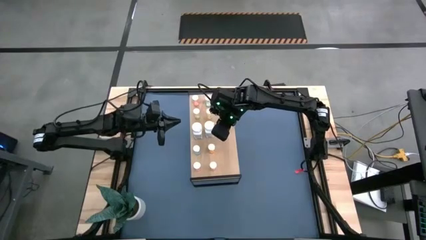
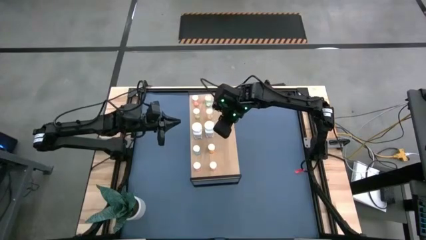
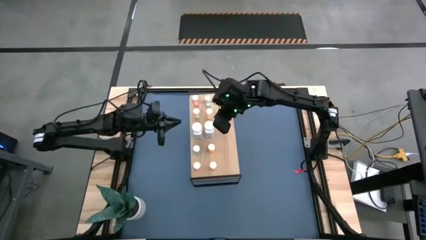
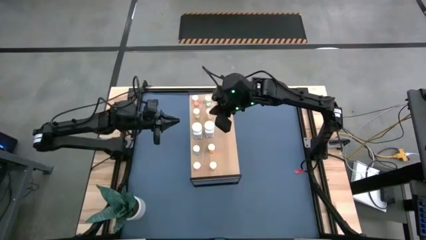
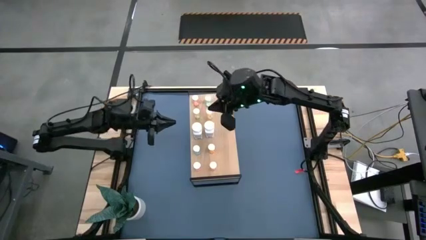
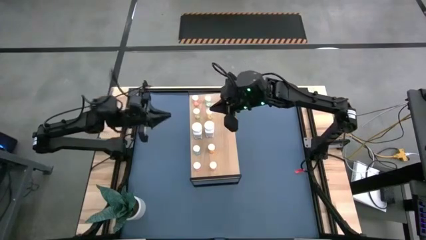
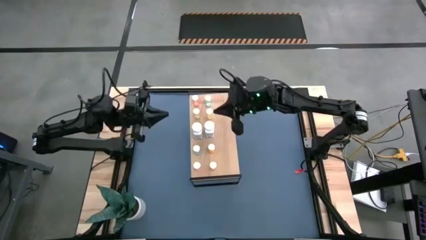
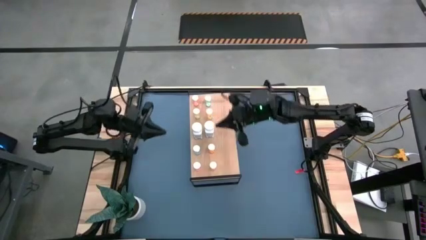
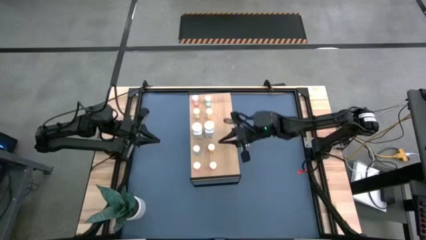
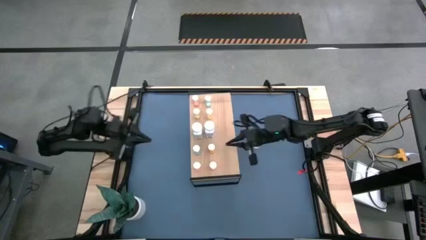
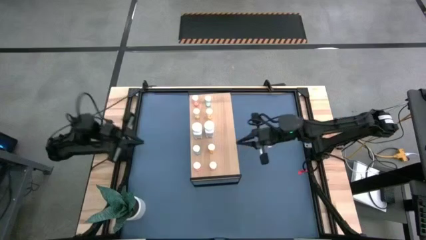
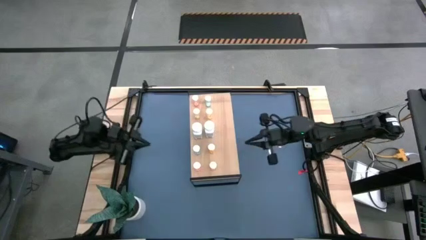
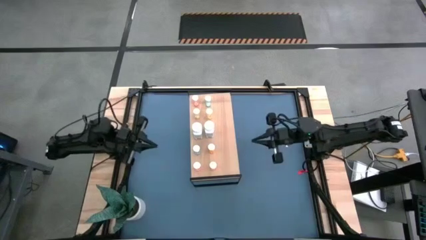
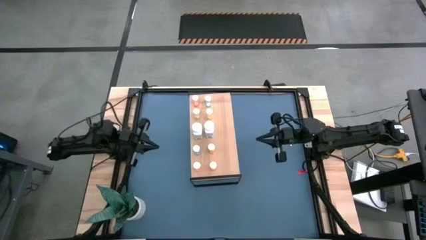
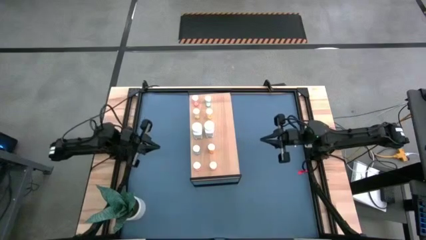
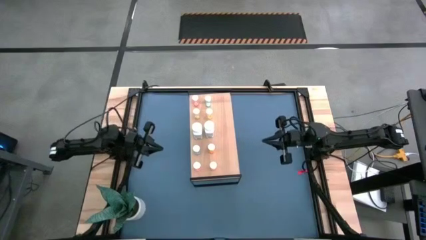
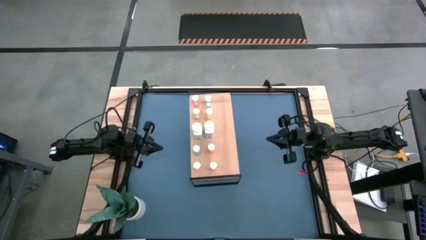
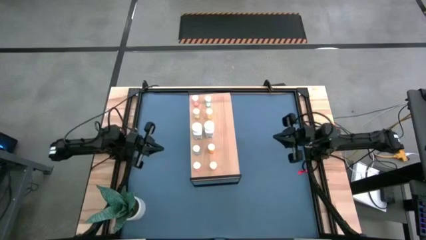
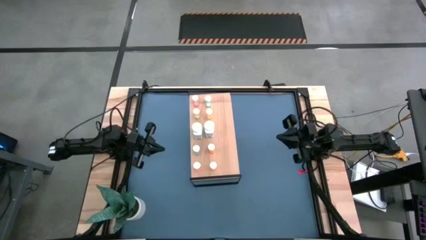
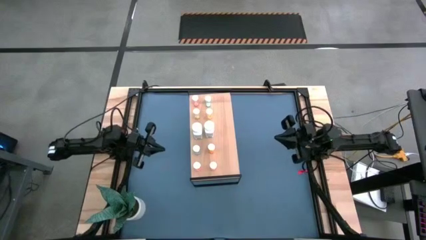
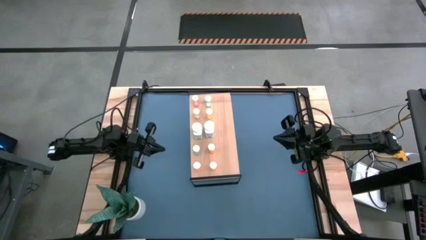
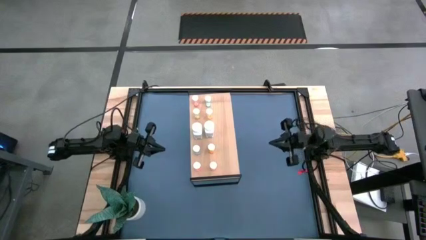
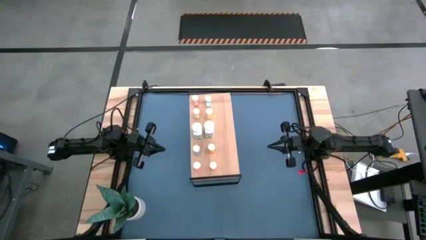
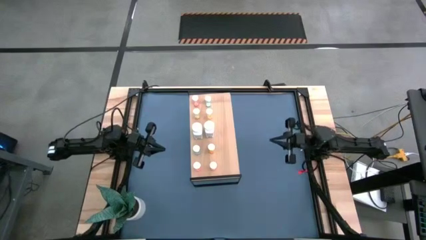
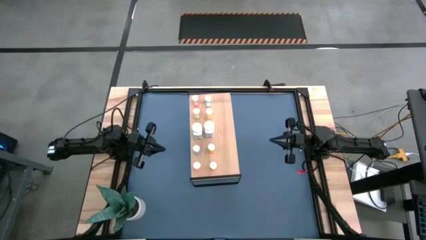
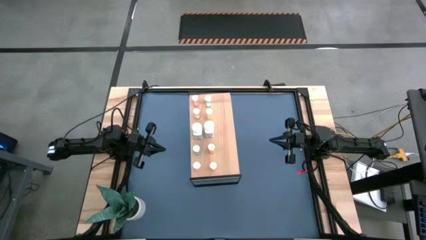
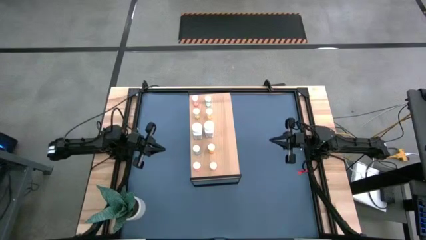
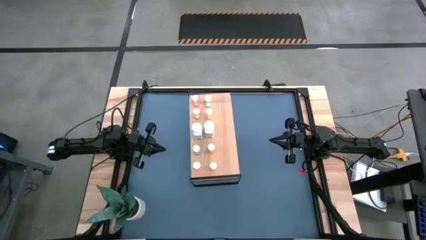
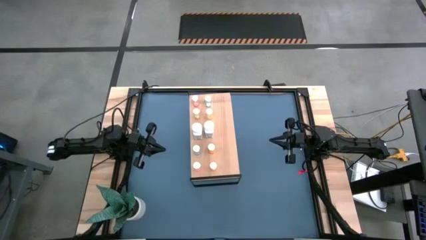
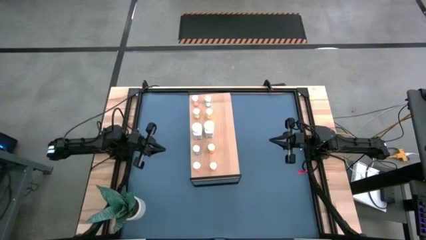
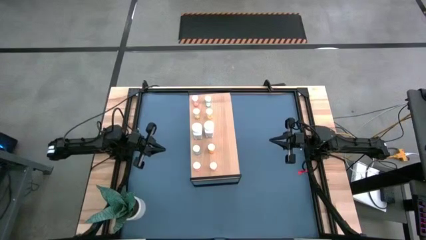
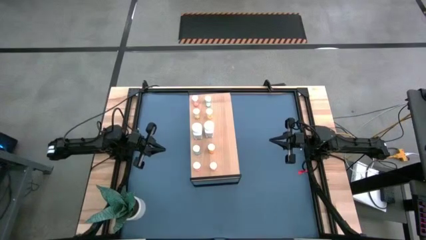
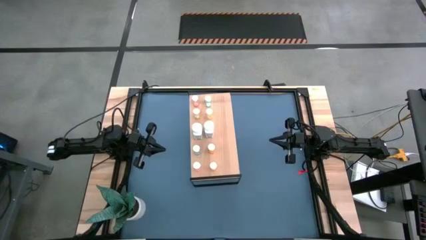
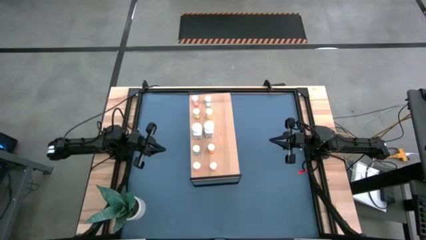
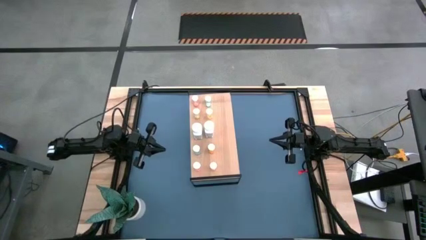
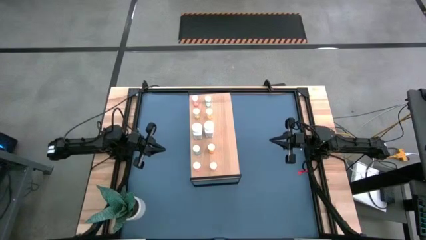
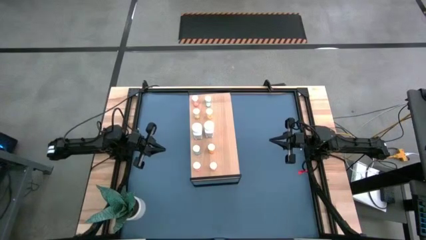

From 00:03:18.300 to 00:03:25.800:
Task: Pick and place medicine bottles onto shelf by color
Return to Home Position

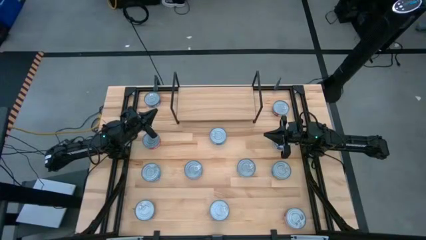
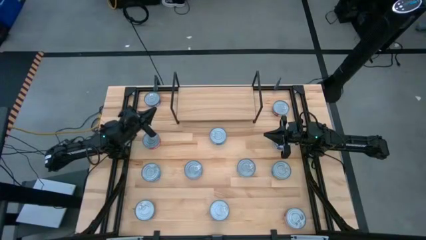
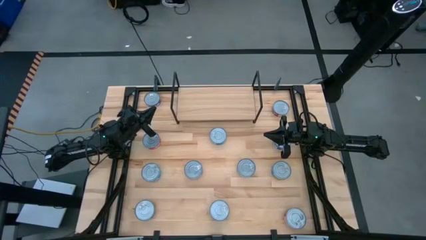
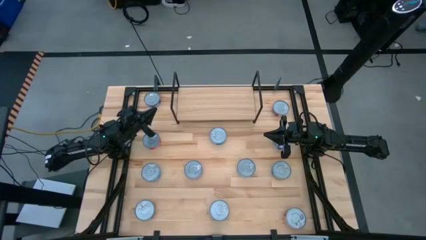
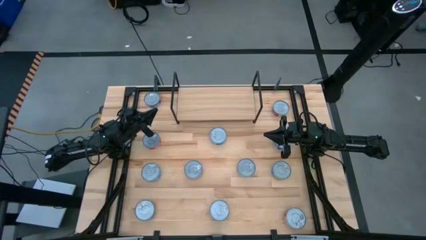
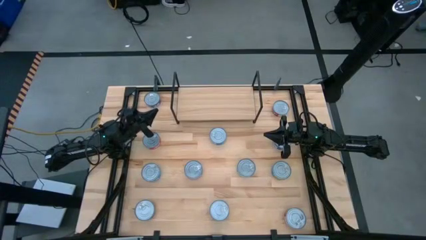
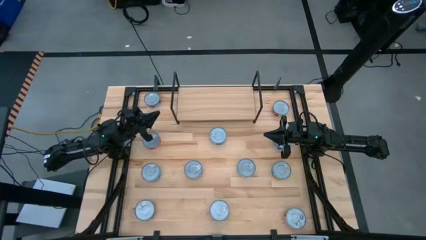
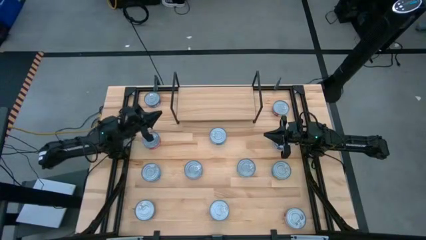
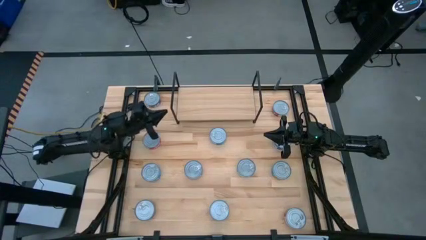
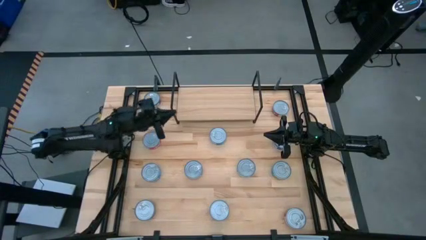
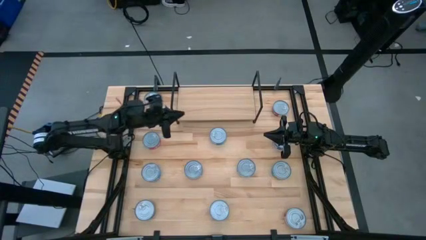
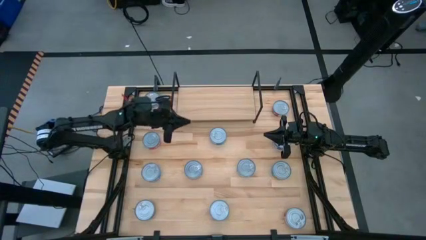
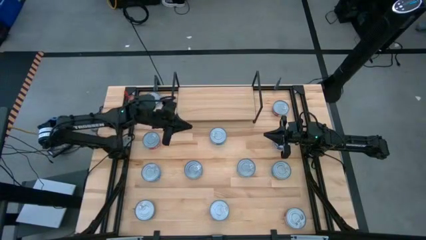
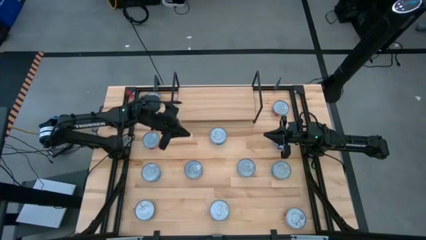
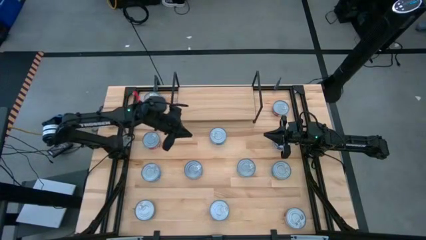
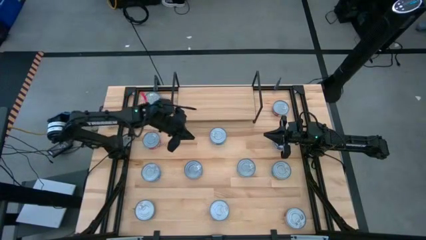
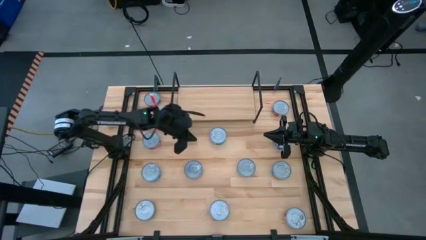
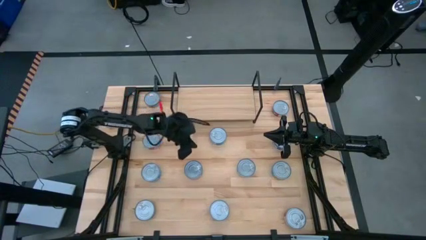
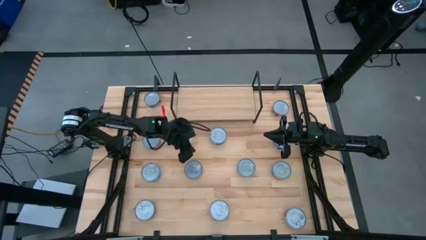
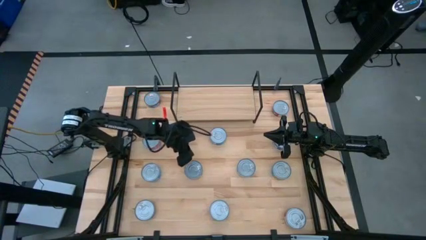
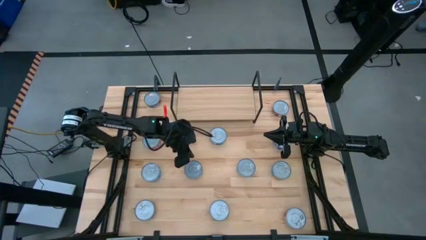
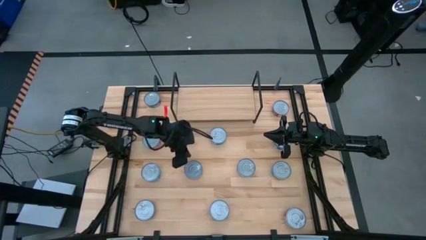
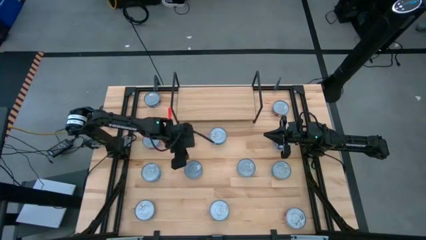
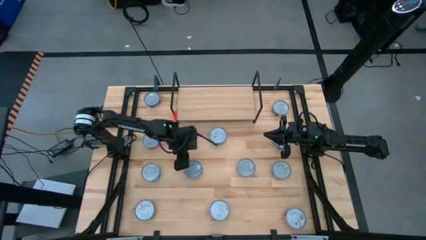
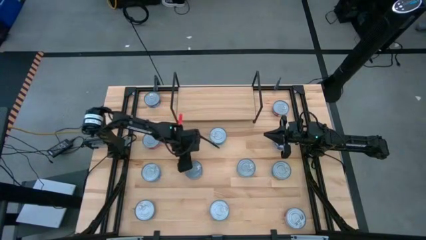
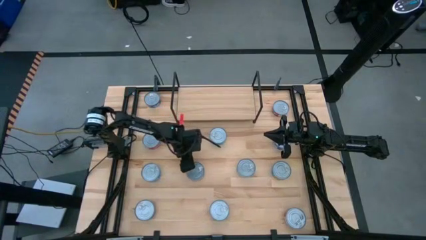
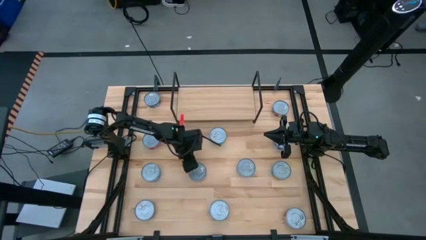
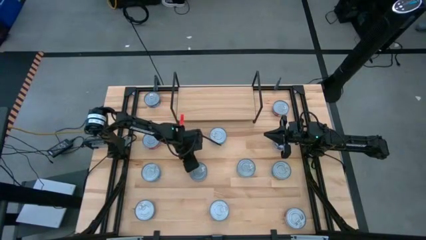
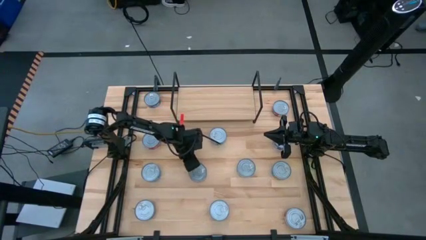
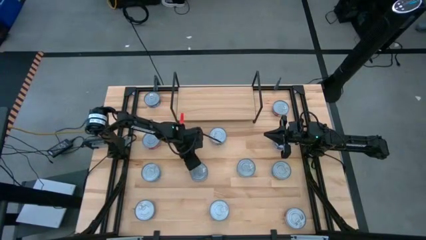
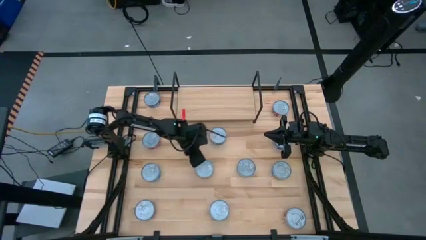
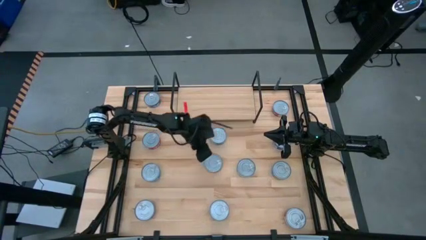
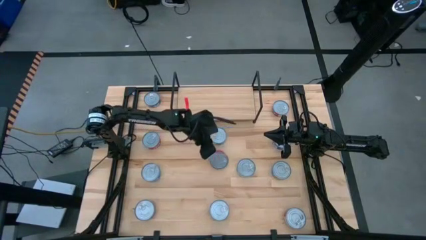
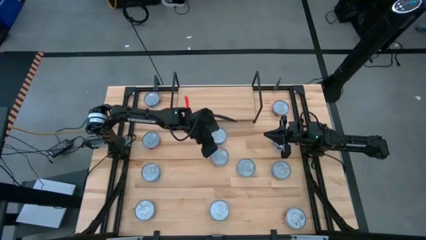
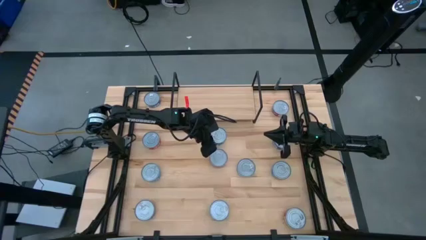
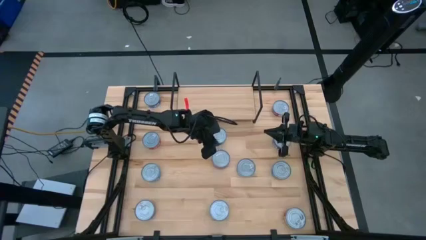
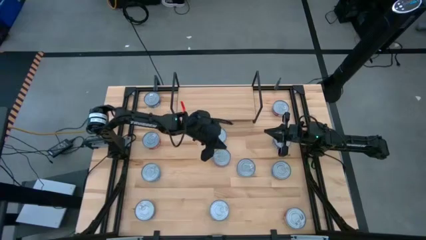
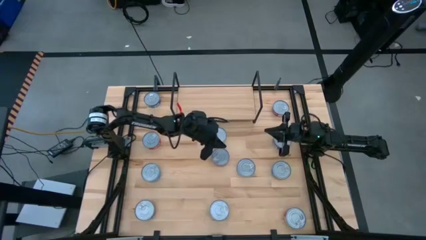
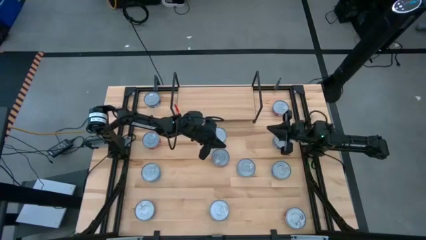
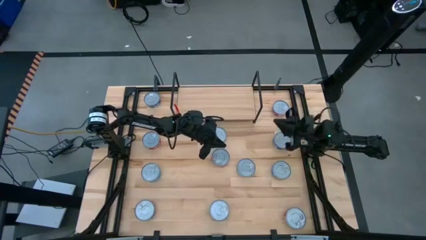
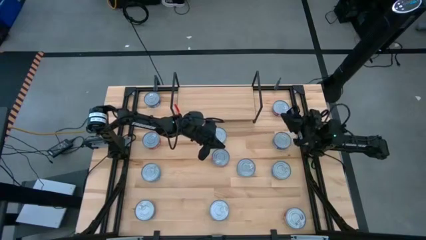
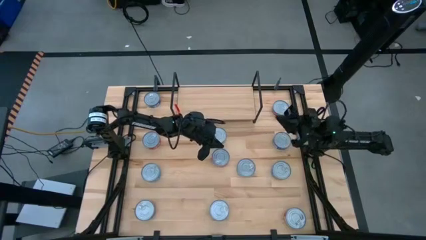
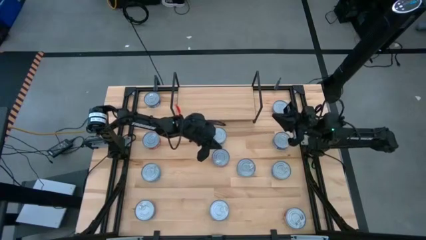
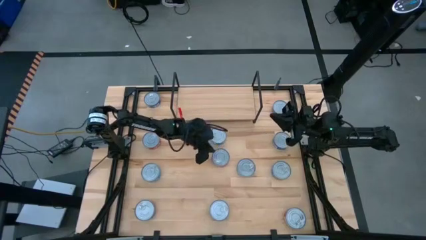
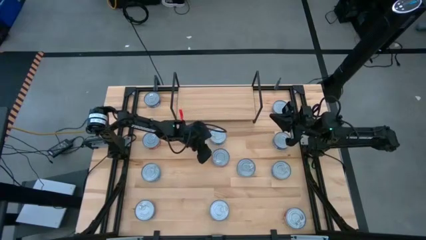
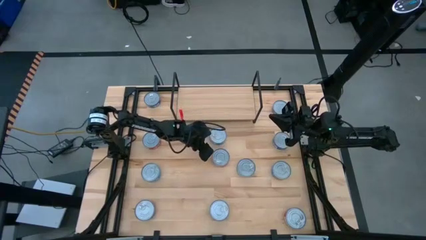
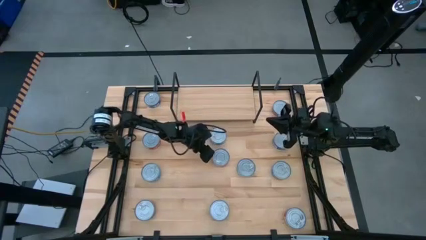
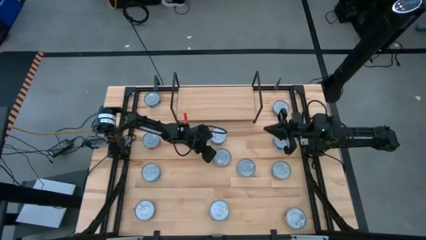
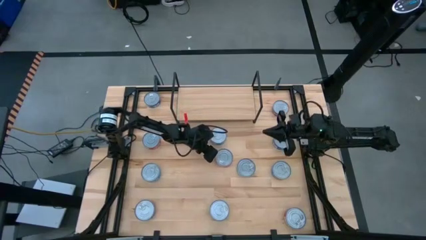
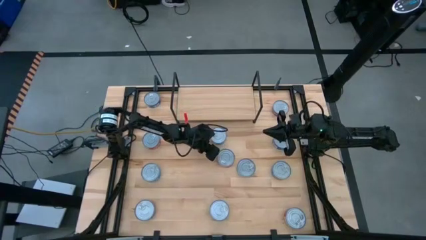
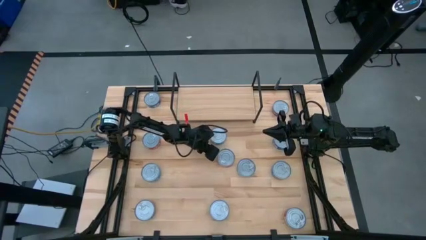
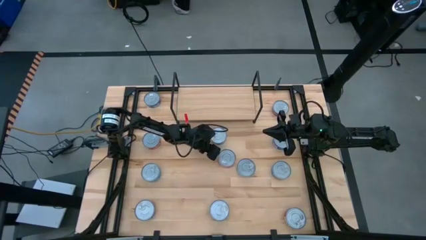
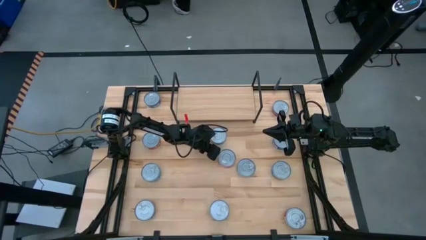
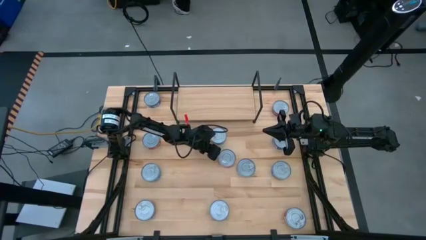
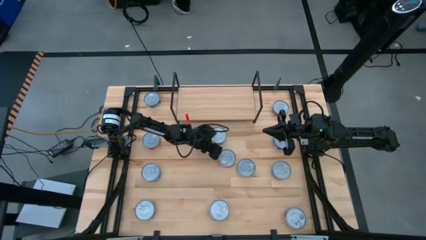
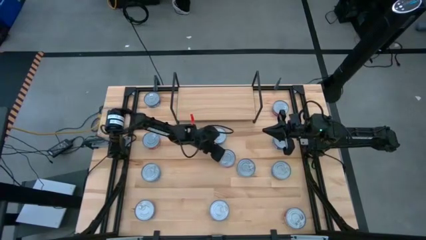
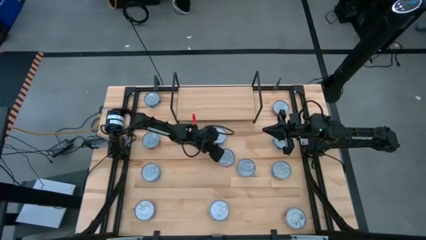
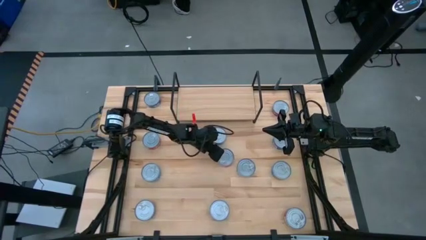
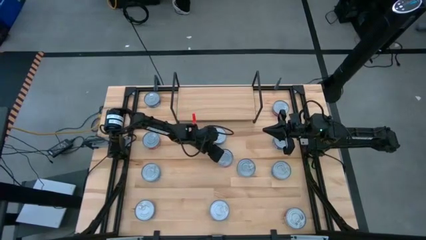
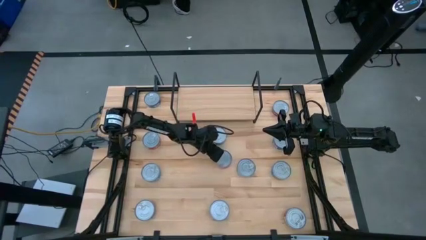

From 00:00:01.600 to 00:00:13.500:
Task: Stack canned seafood by type on shelf
Put the center red tuna can on the shelf
